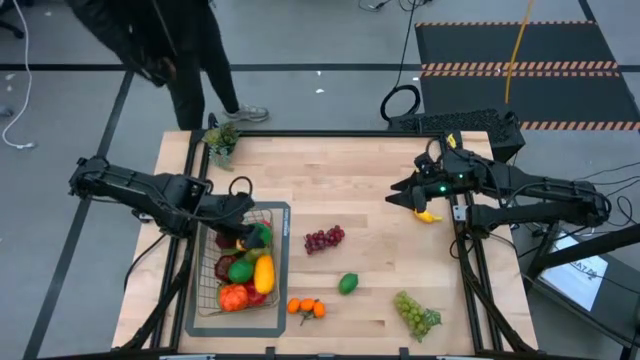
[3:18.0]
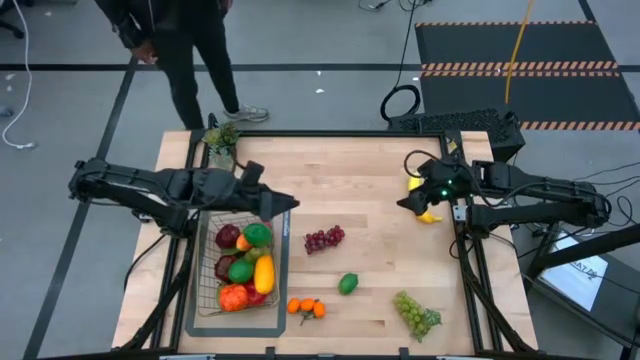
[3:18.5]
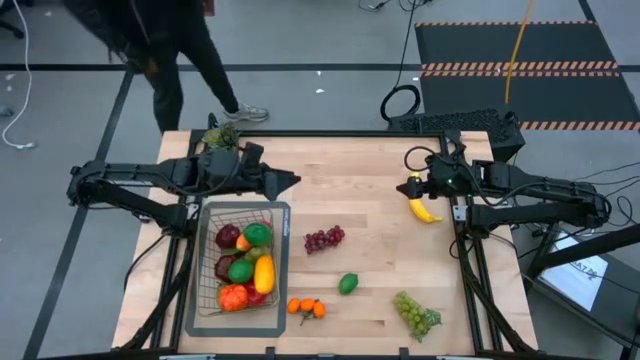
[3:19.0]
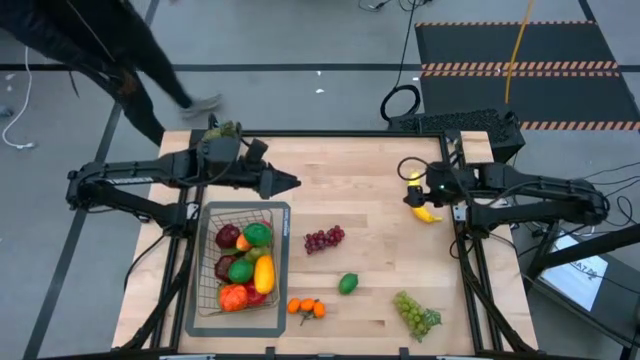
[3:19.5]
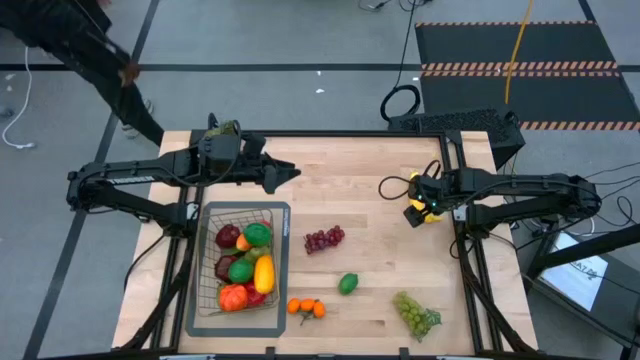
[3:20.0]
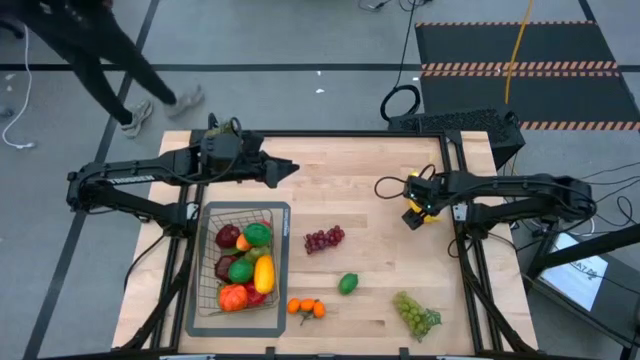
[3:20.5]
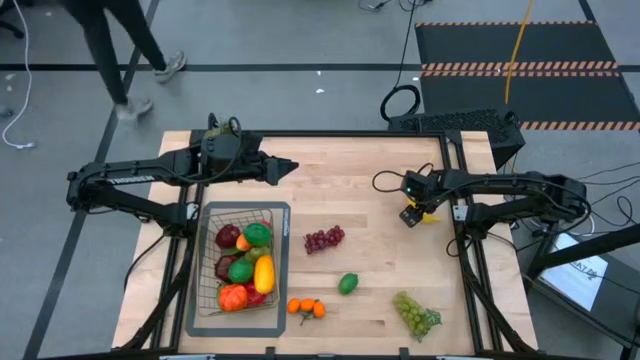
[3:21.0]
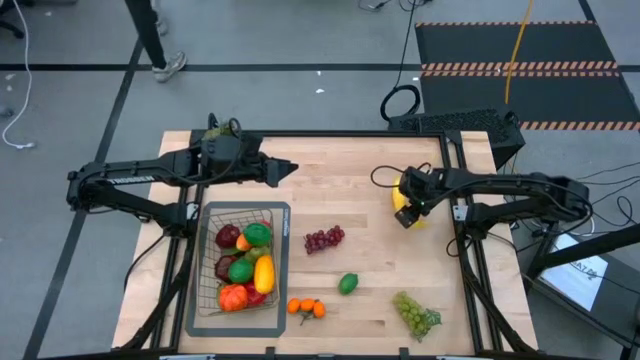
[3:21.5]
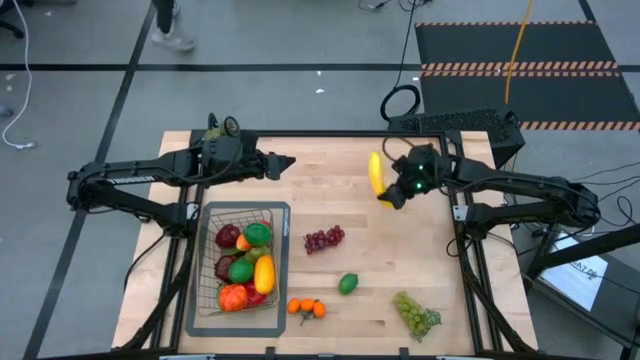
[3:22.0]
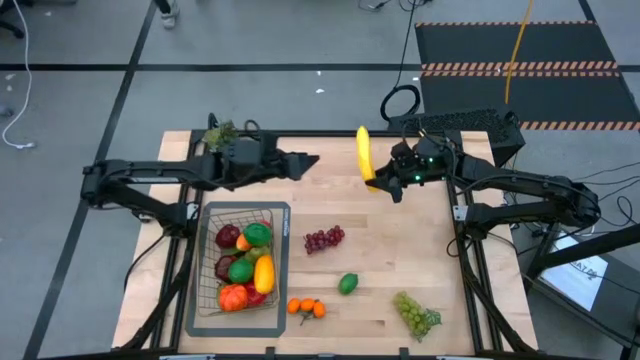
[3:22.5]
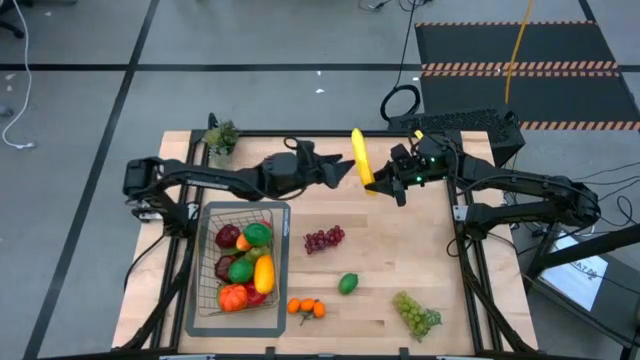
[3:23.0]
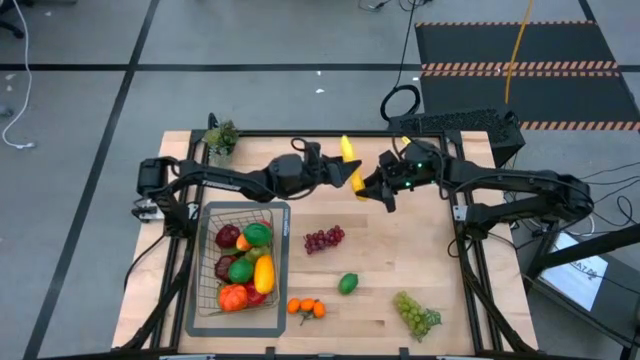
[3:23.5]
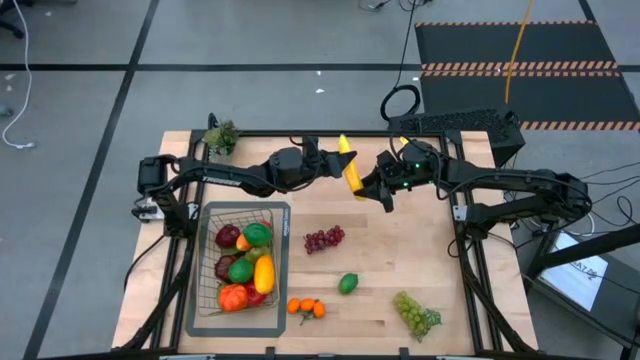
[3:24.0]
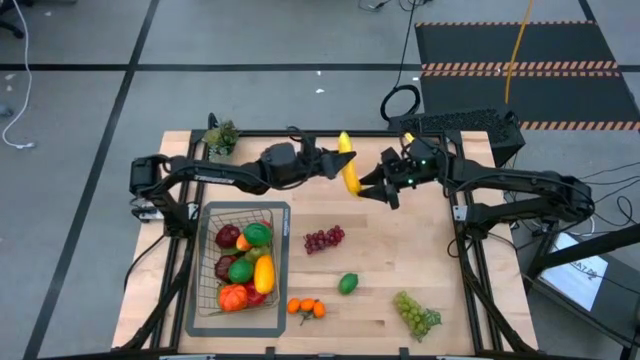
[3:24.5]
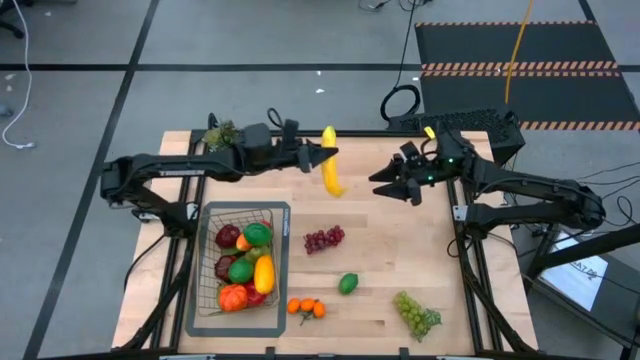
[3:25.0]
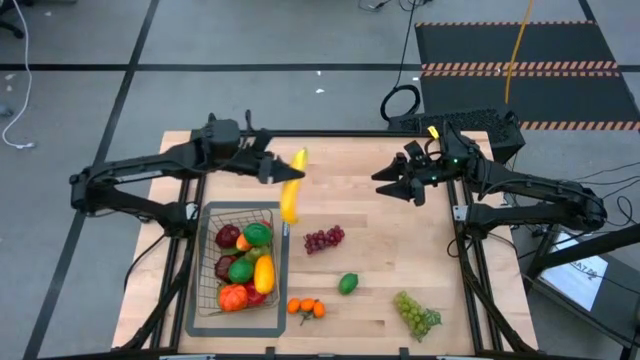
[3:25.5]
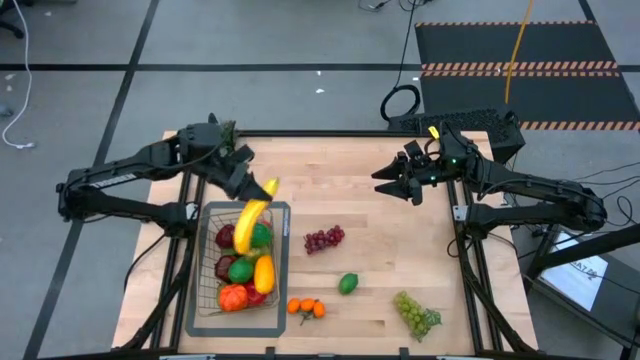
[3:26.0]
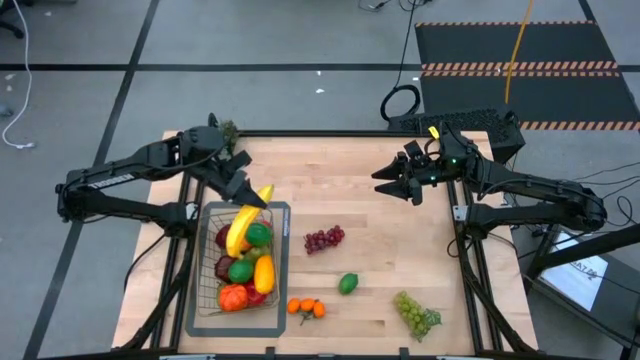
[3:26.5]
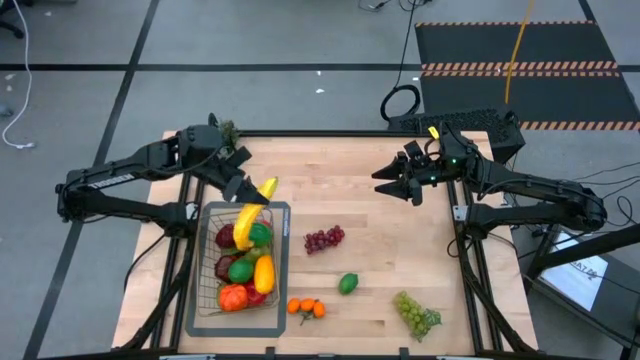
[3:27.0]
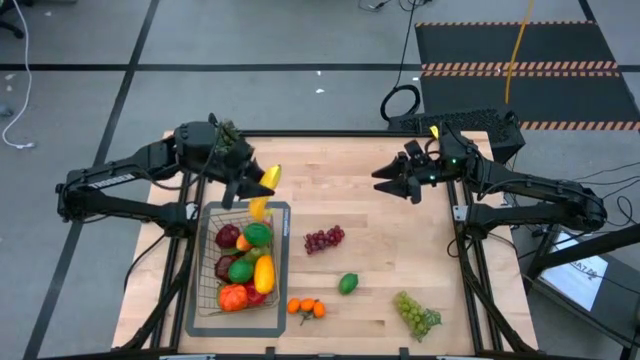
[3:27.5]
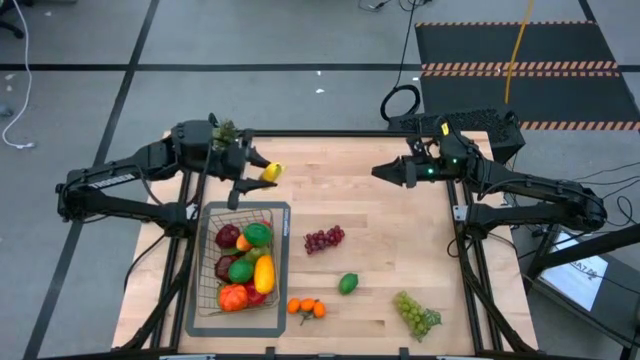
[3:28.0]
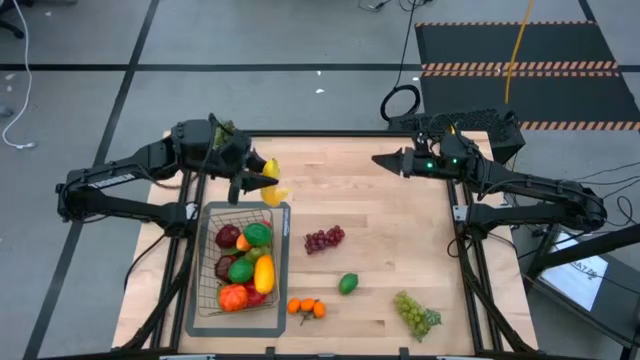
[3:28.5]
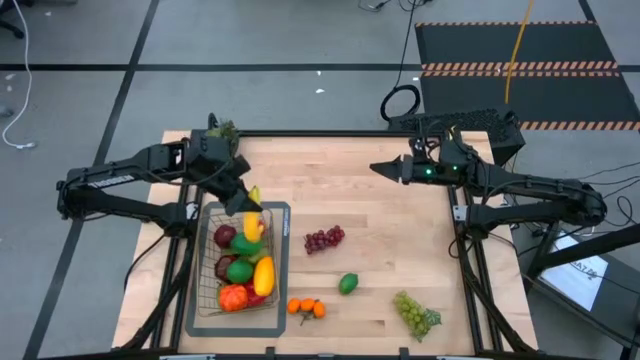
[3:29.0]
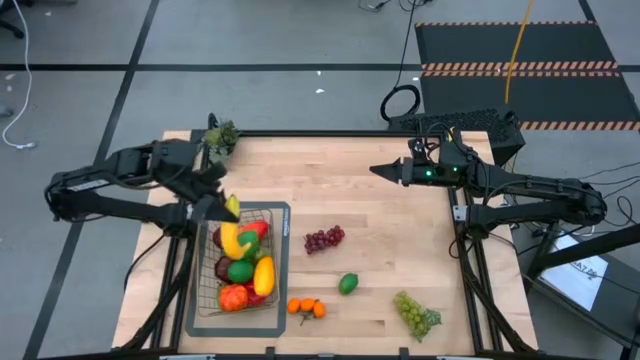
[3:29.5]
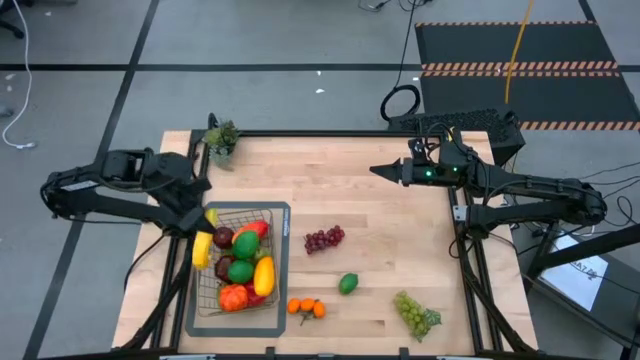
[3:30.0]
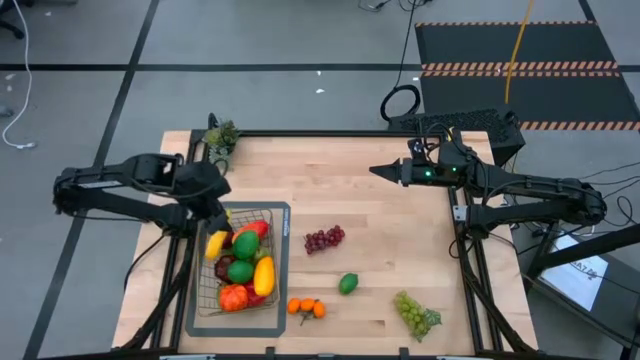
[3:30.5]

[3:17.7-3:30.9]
Task: Build produce basket
Put the yellow banana into the wire basket

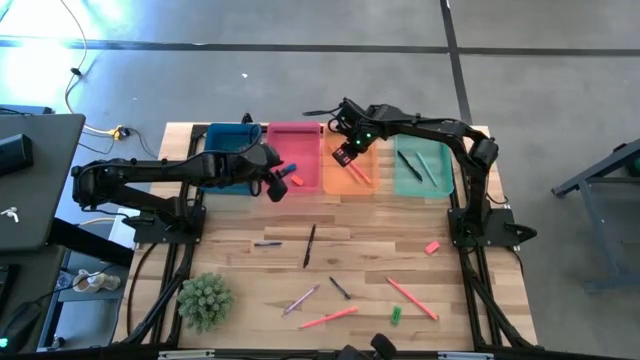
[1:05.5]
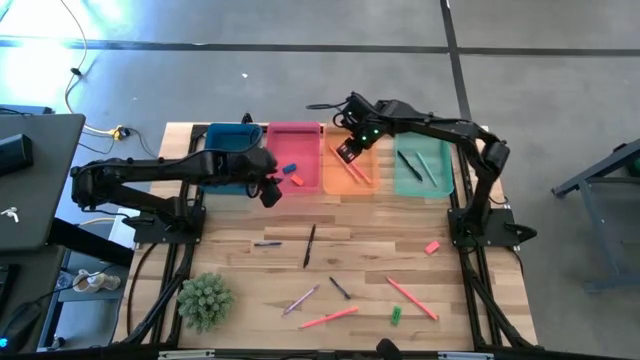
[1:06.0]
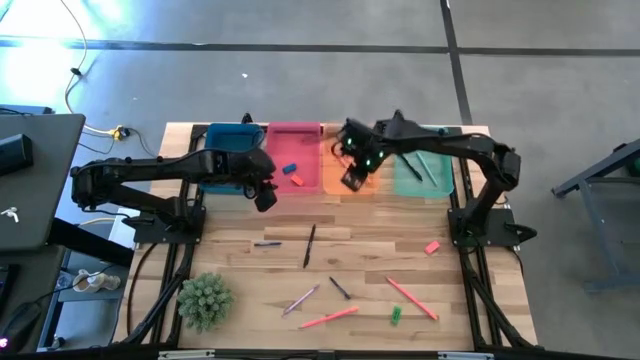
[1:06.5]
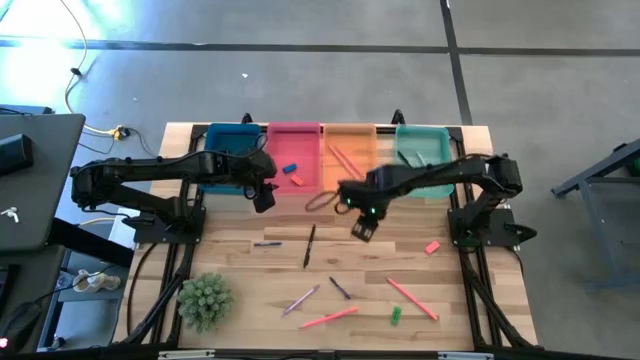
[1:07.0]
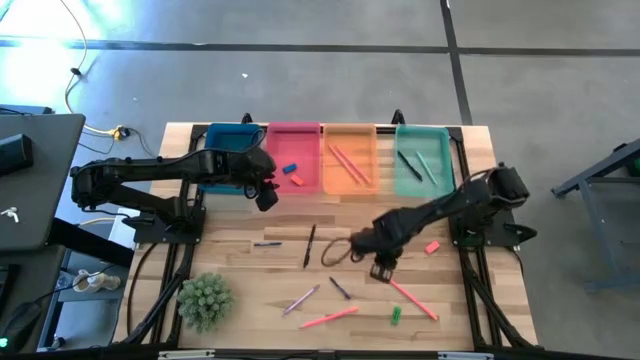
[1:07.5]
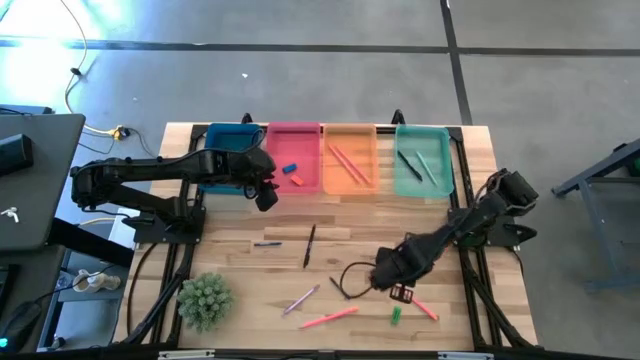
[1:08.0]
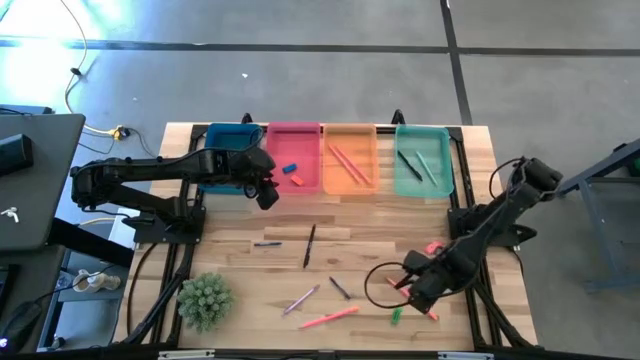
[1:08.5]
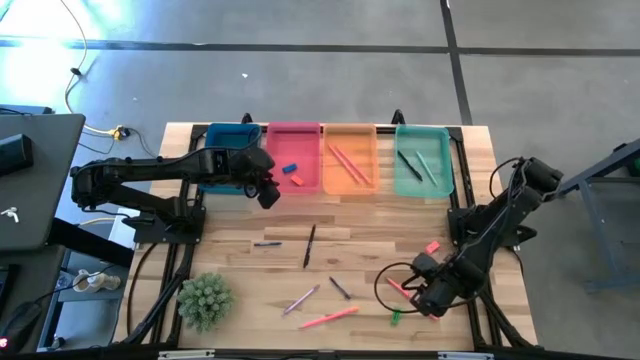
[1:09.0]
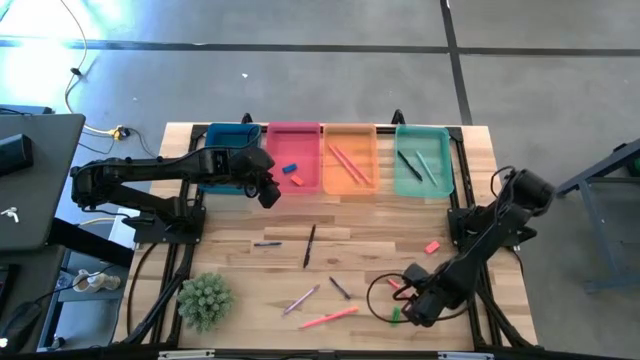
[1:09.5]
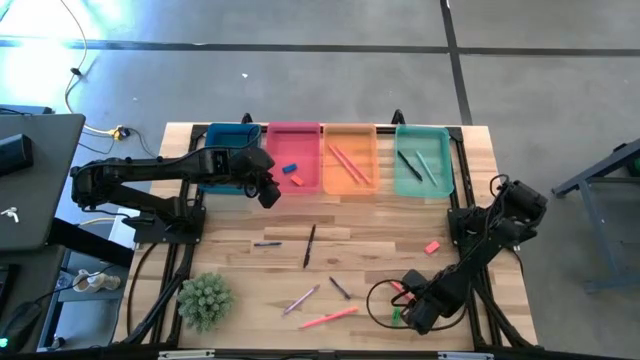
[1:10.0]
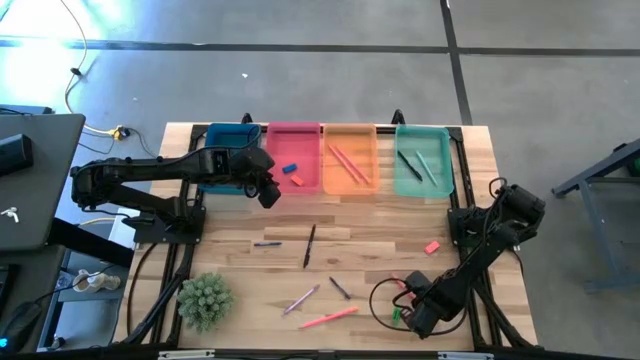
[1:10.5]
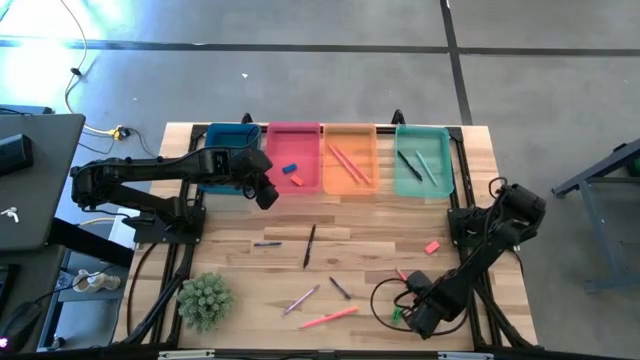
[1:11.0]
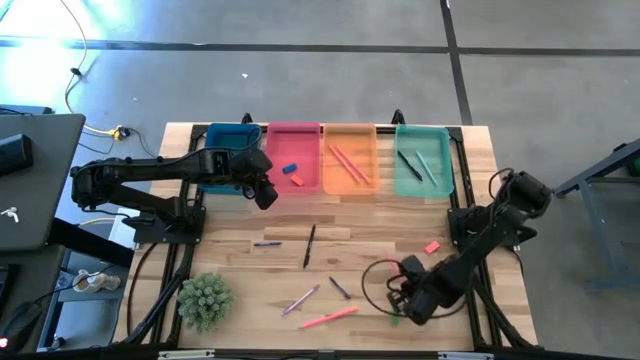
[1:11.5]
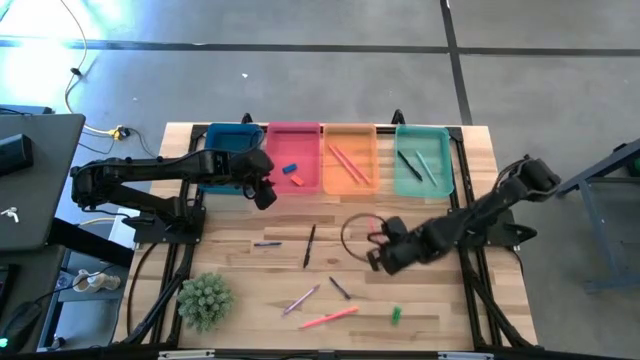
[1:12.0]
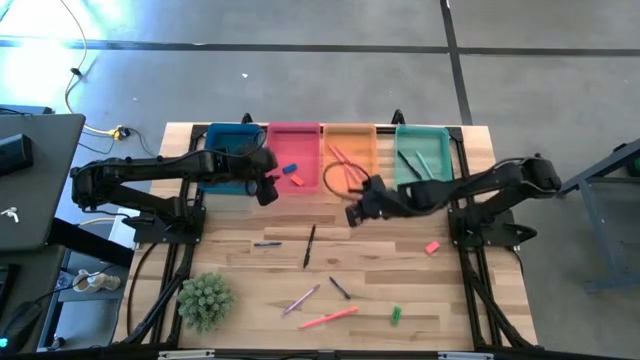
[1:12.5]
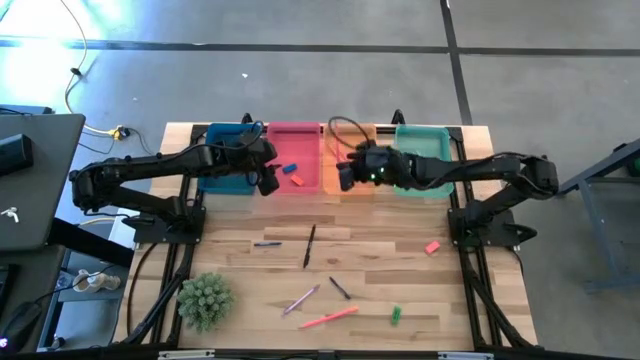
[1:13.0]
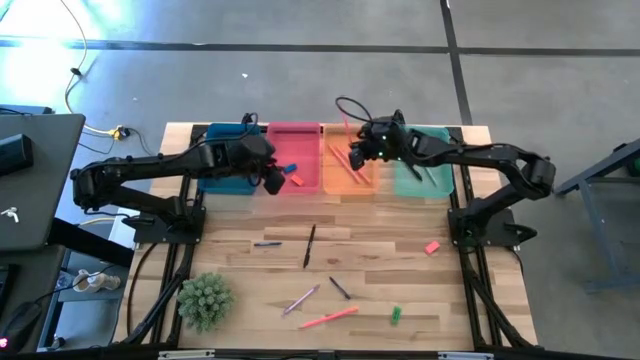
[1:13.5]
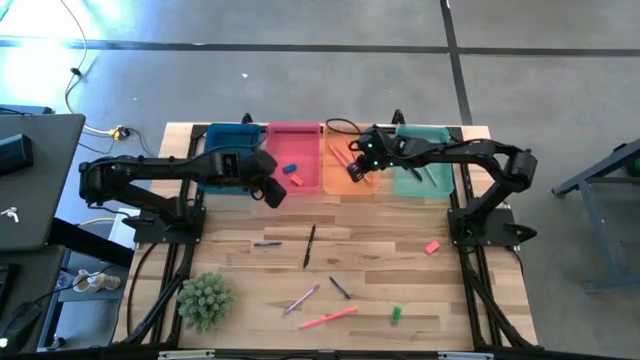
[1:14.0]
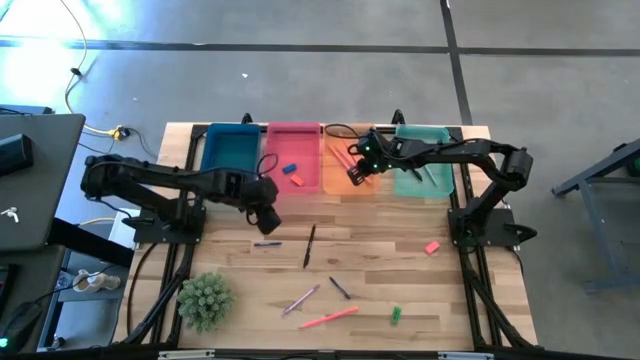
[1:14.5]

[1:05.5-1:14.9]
Task: Sort crayons/erasers/pens/pencils in bins
Put the pink pencil into the orange bin
